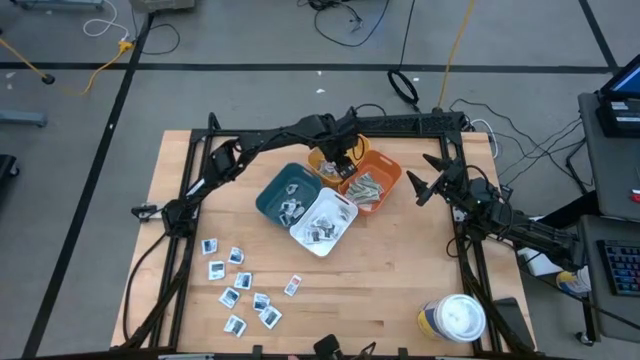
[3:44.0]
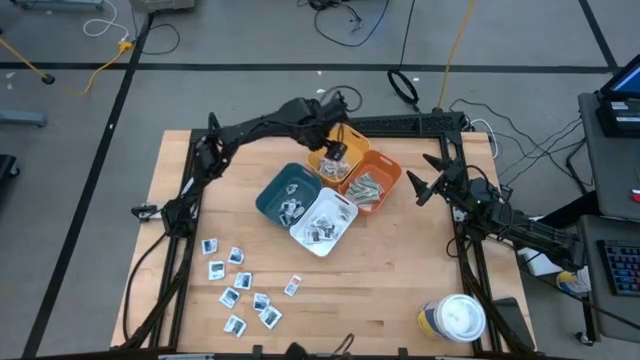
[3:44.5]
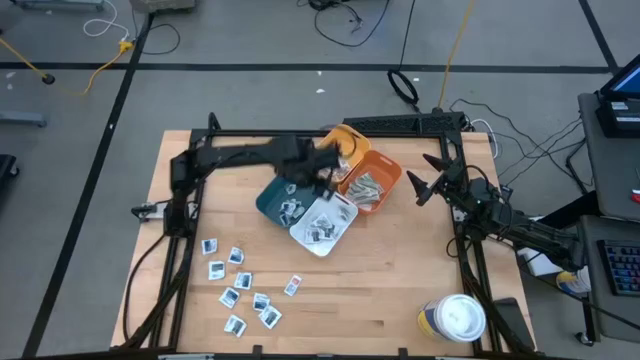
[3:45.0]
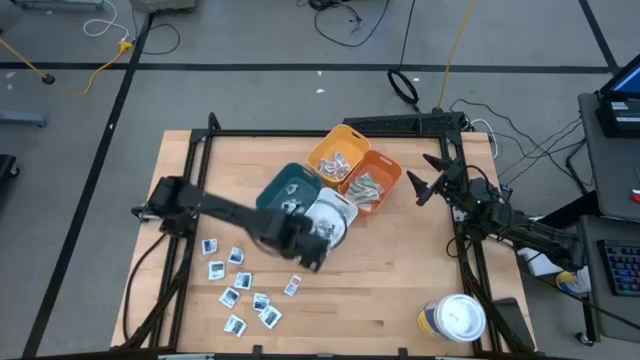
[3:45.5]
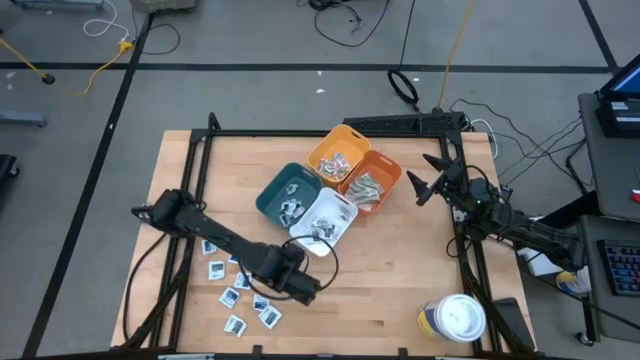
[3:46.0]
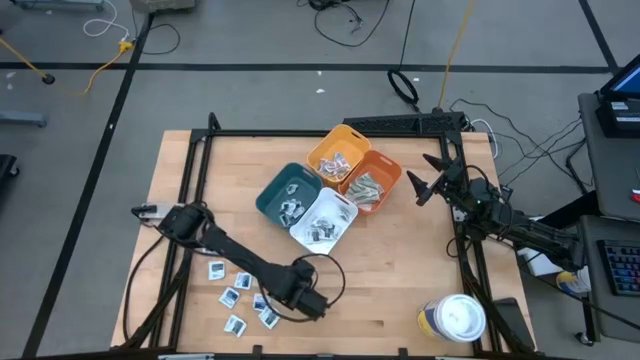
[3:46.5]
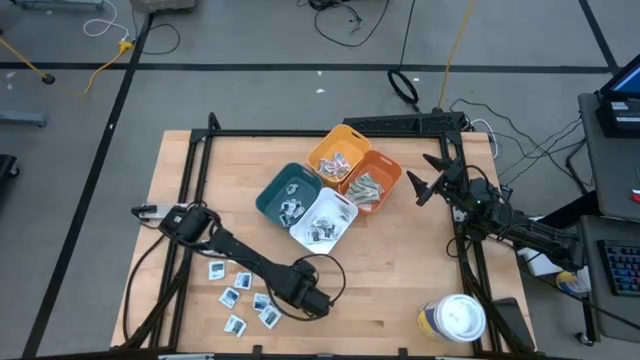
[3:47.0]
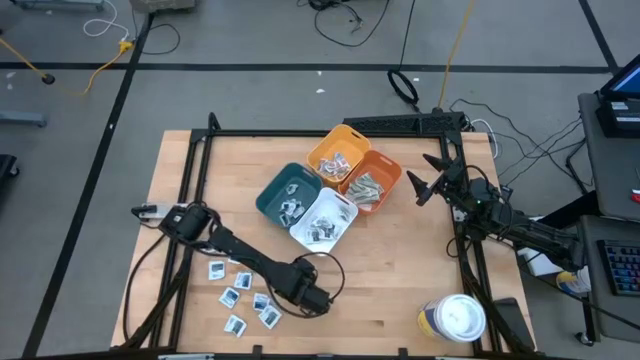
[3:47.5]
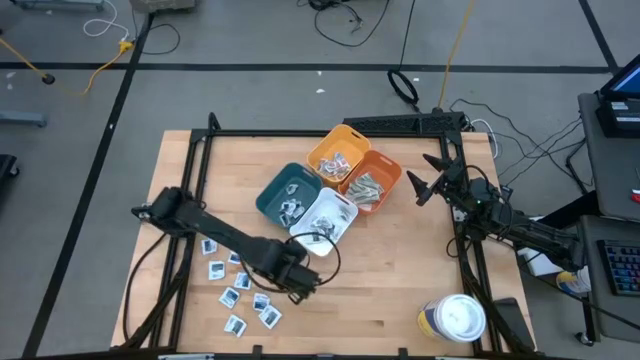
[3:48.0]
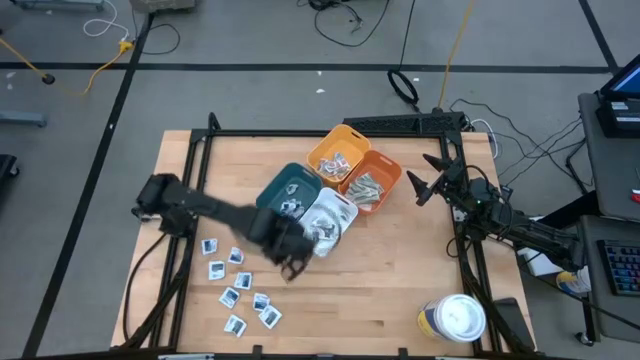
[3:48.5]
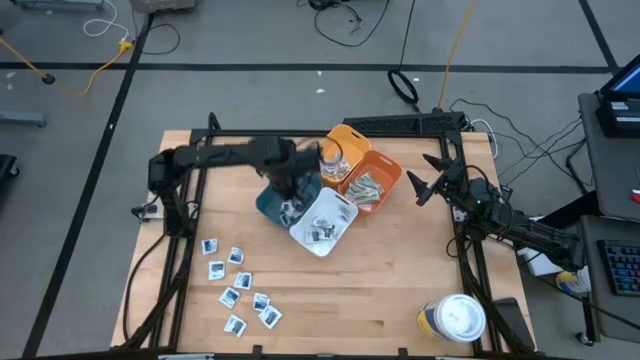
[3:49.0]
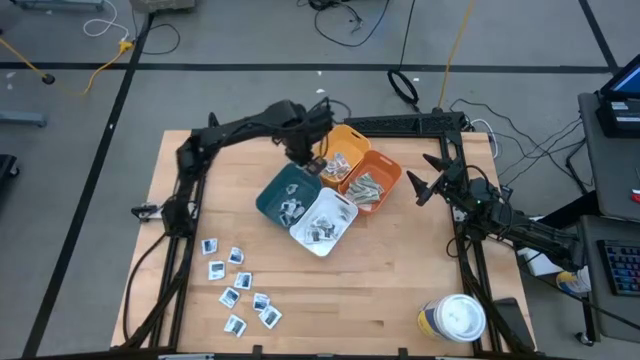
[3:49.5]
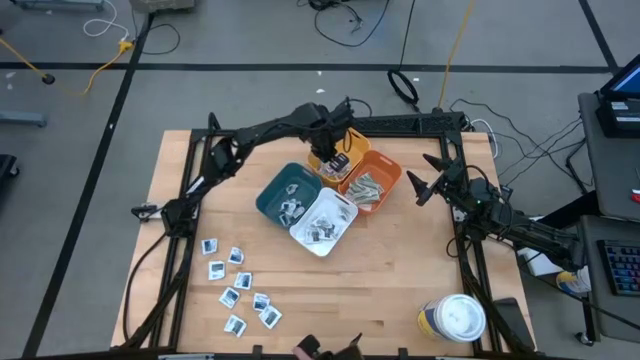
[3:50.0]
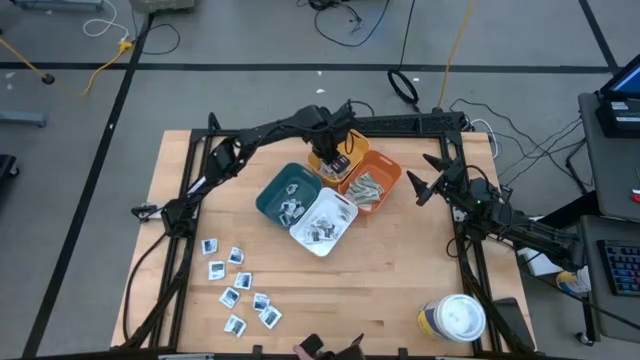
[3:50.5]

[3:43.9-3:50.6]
Task: Pick & Place First Aid Supplies
Put the orange ointment pack into the yellow bin

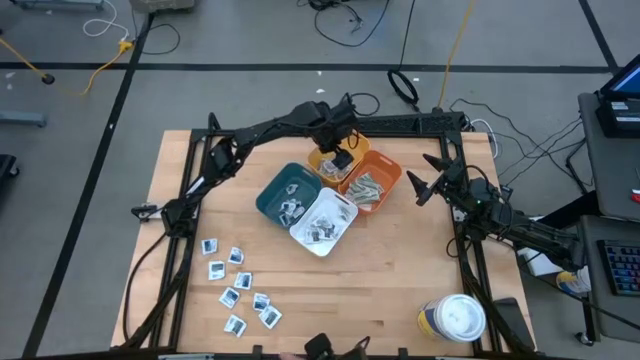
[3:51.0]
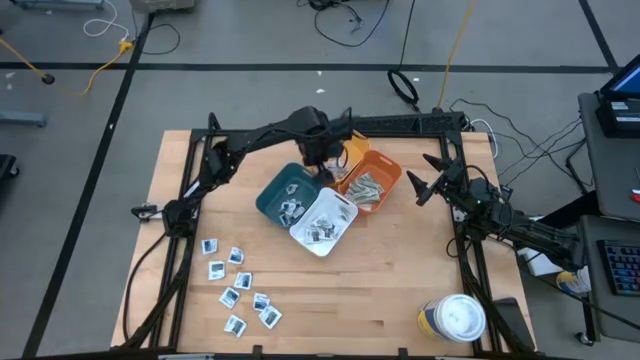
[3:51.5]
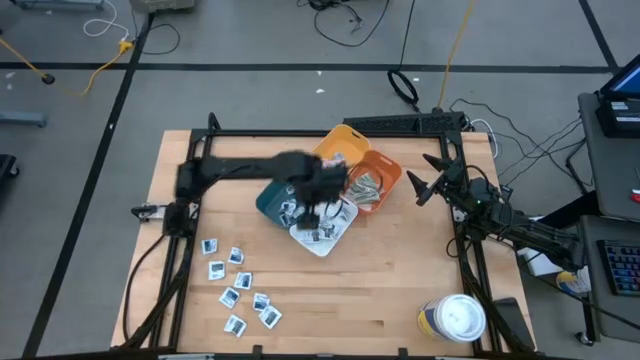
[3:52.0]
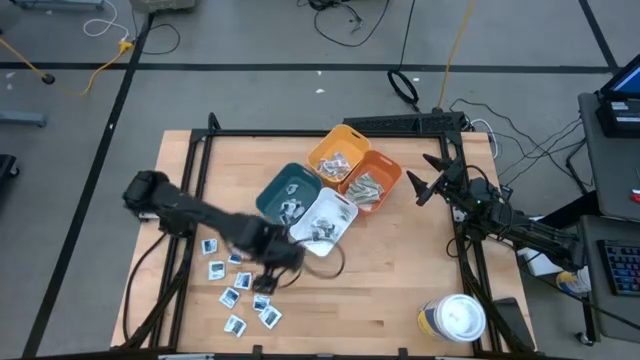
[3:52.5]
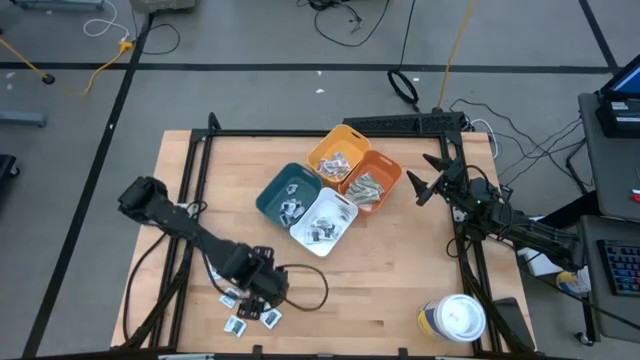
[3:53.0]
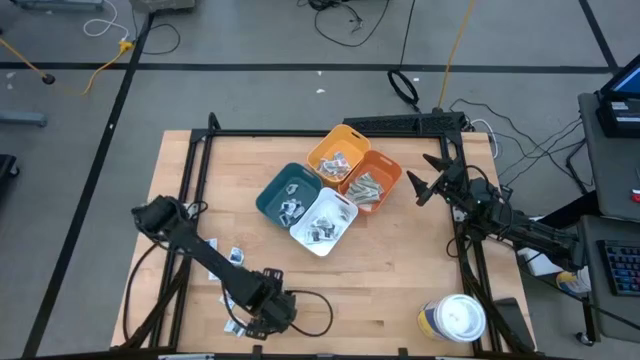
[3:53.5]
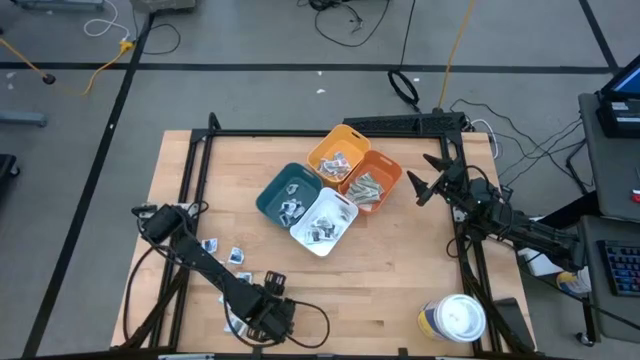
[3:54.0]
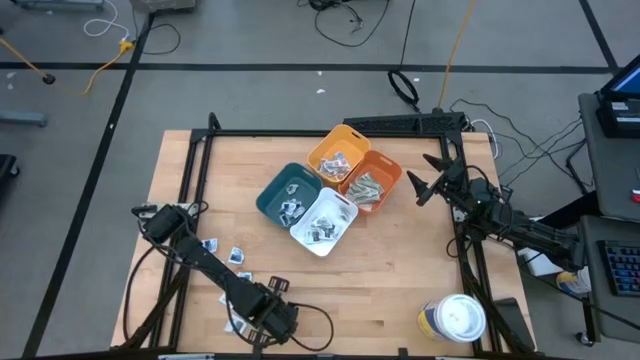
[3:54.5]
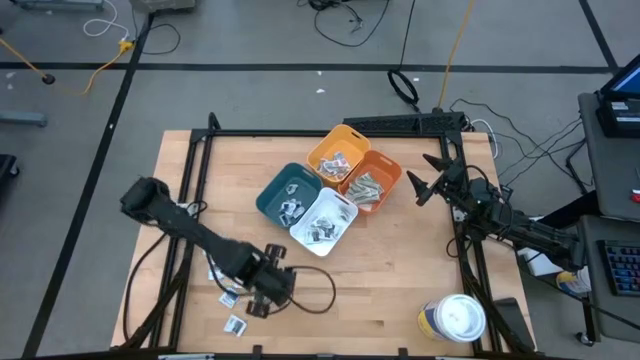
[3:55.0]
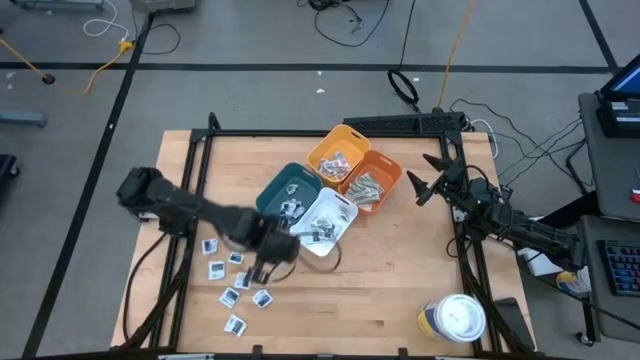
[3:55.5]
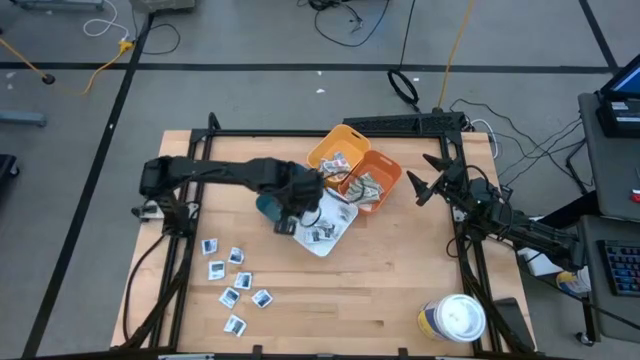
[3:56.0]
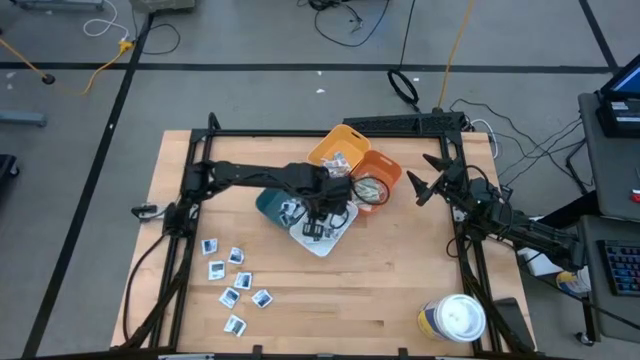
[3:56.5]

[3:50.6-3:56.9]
Put the black towelette pack into the white bin

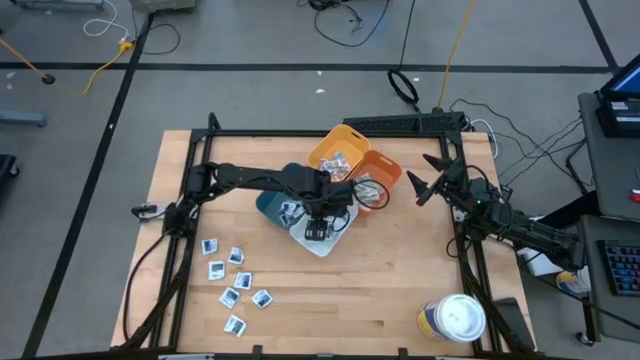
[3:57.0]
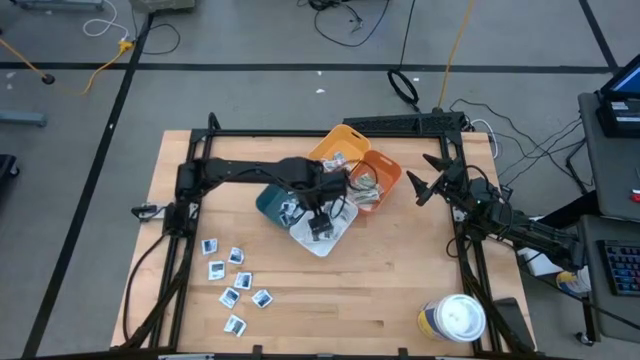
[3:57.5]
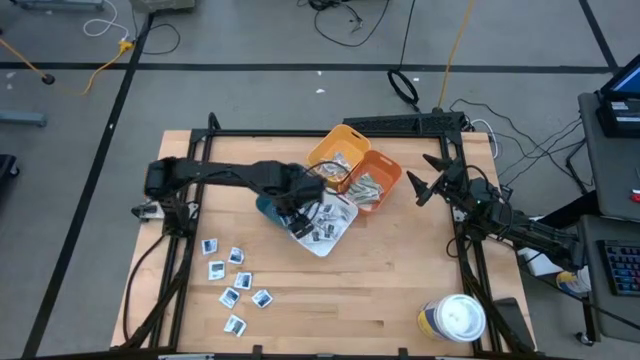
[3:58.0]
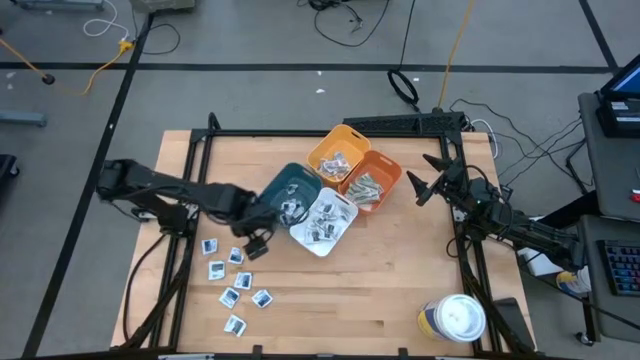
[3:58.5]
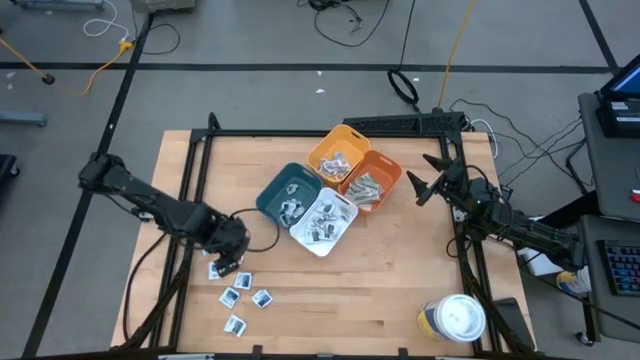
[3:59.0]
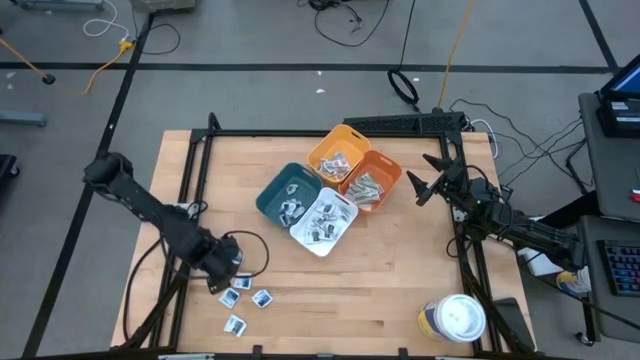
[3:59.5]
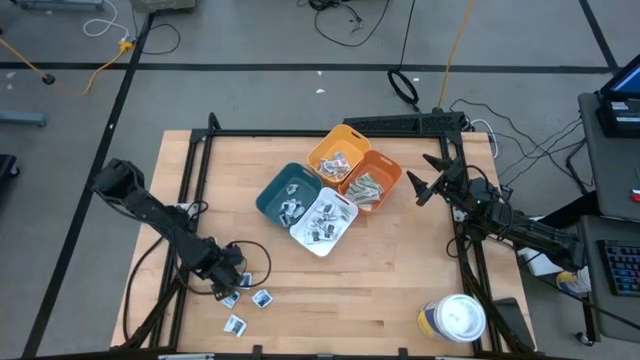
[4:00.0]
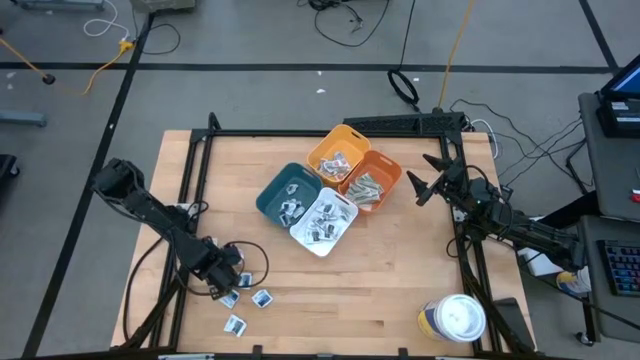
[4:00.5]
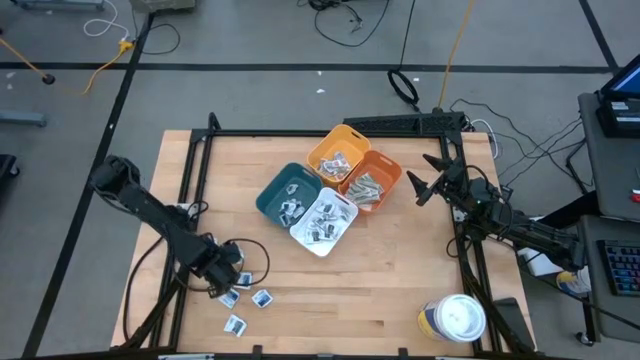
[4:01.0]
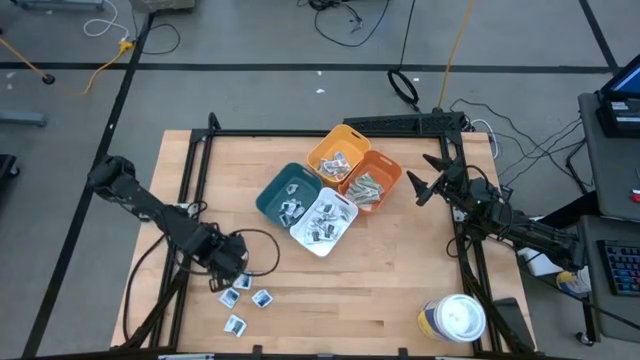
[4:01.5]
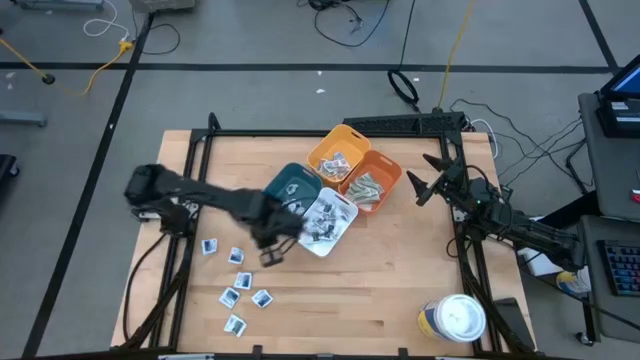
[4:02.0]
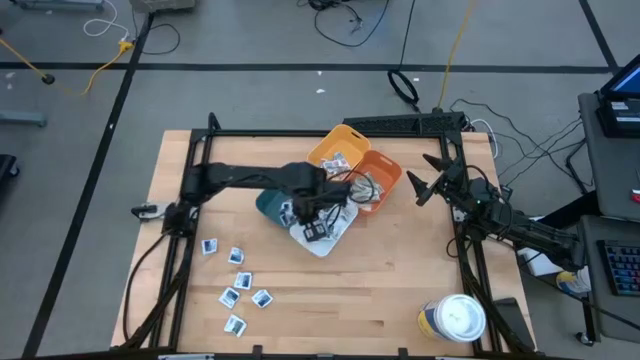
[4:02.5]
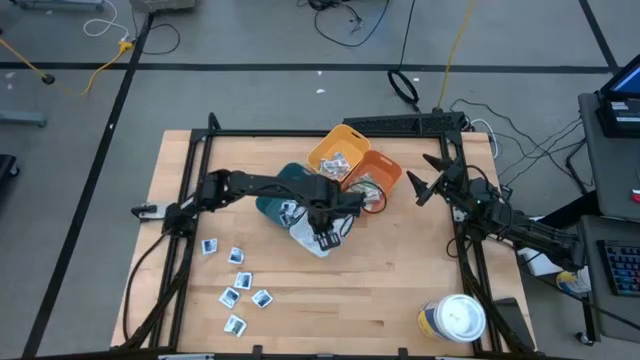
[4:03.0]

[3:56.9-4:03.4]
Put the black towelette pack into the white bin

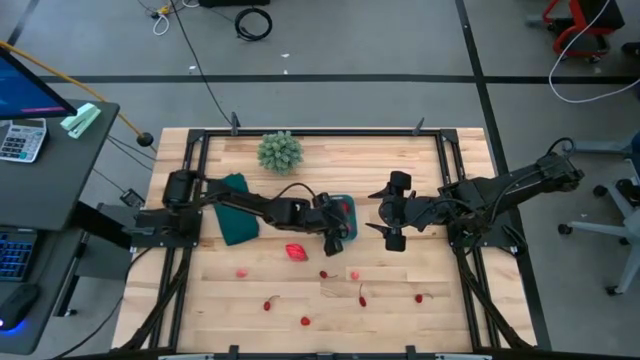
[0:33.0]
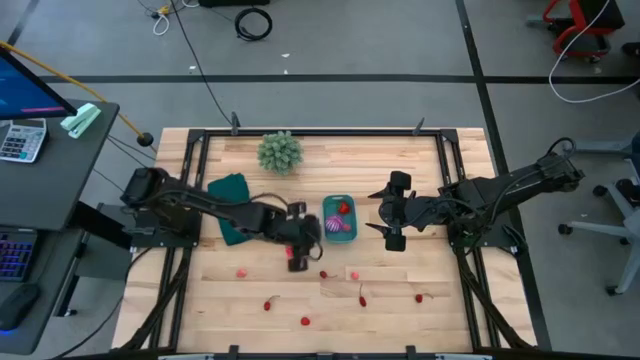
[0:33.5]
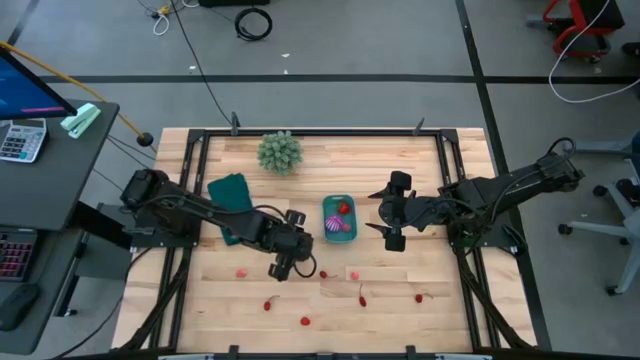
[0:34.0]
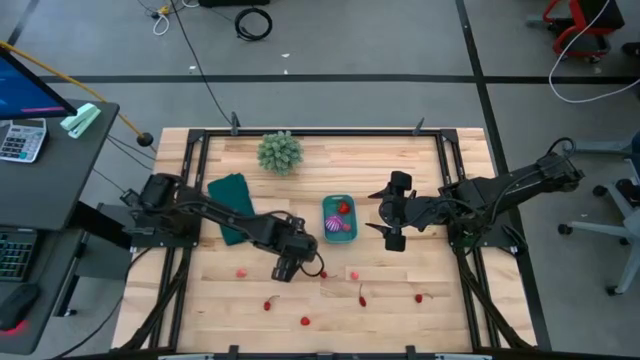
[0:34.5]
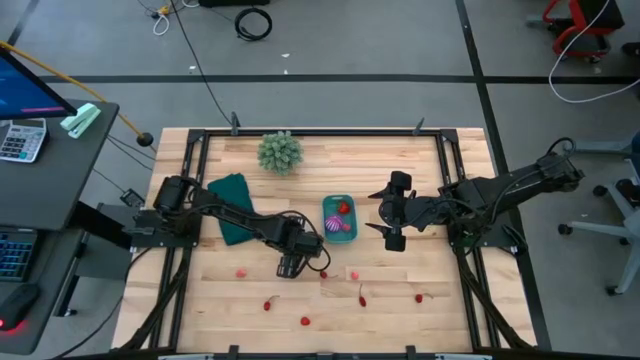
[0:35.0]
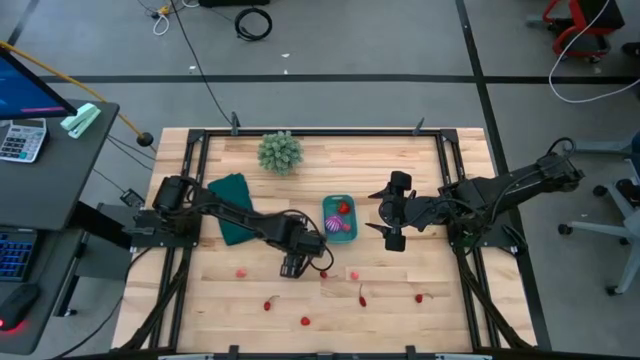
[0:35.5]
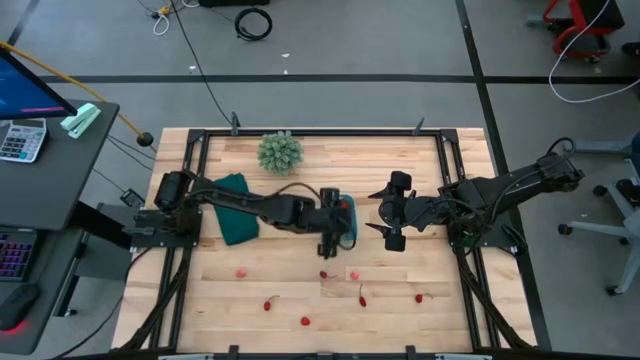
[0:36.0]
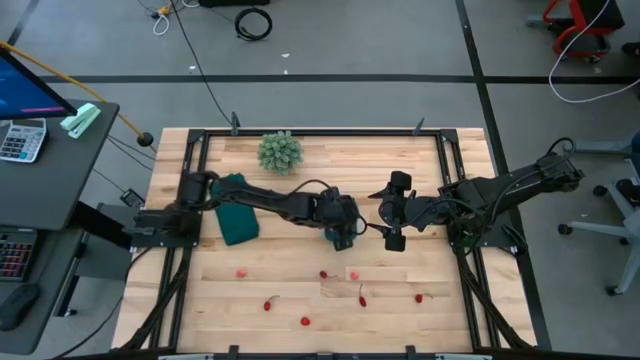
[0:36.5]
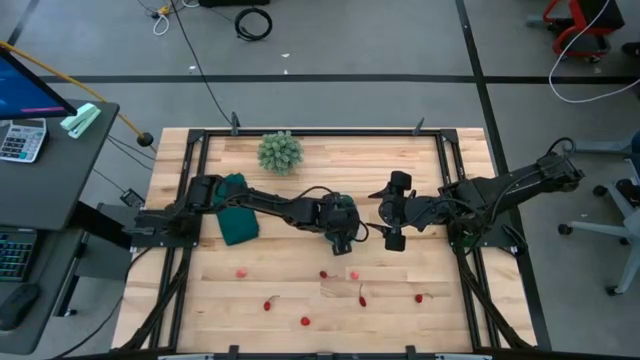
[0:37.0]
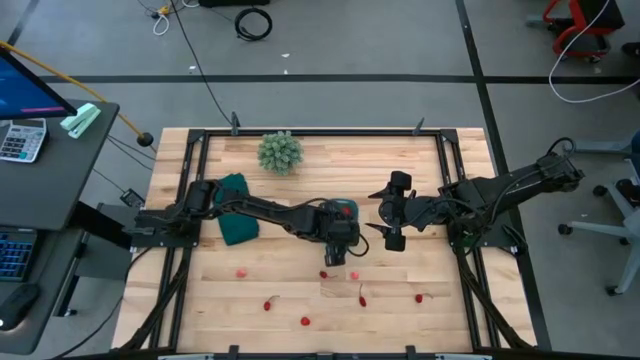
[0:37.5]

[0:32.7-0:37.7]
Task: Pick and placing Produce into tupperware
Put the pink dragon fruit into the blue bin
